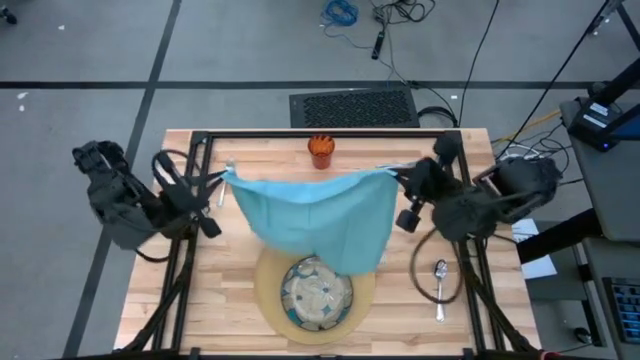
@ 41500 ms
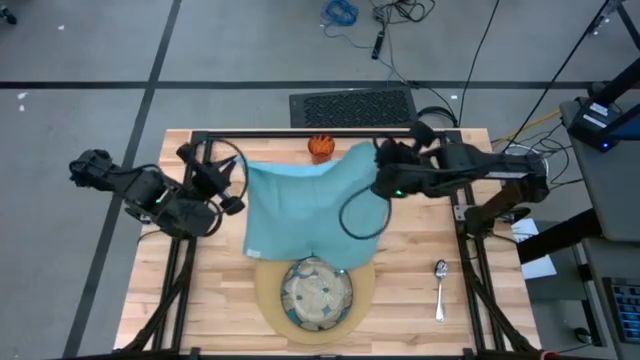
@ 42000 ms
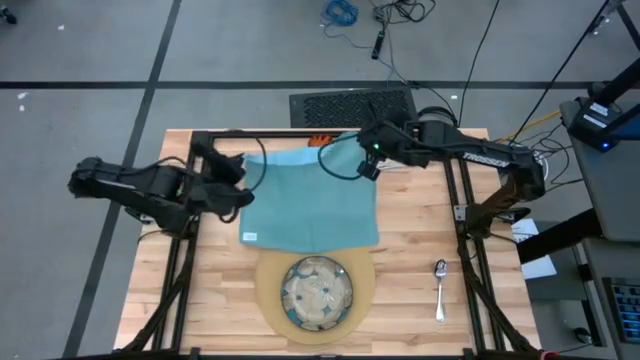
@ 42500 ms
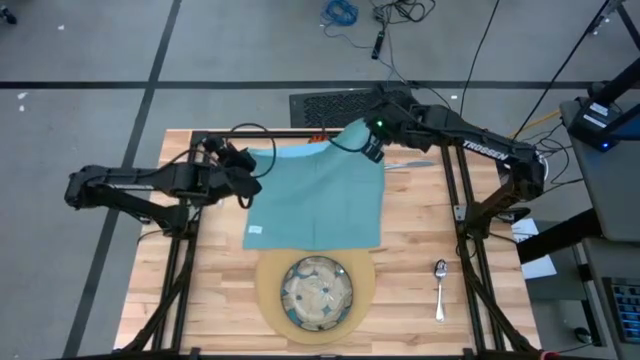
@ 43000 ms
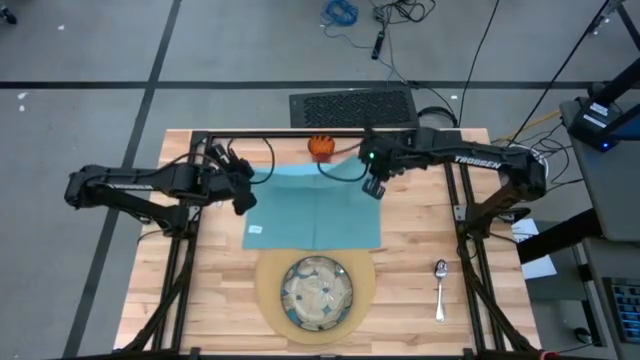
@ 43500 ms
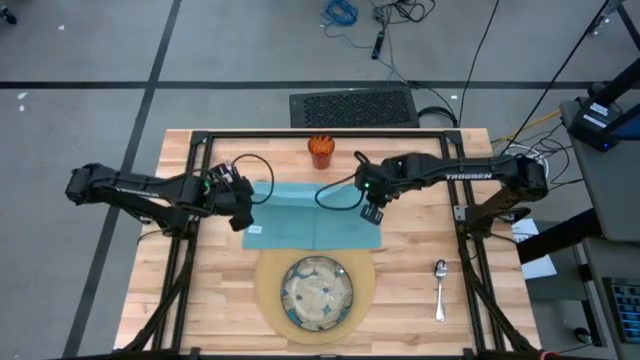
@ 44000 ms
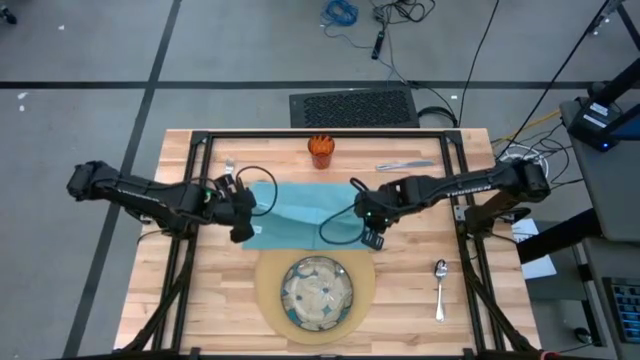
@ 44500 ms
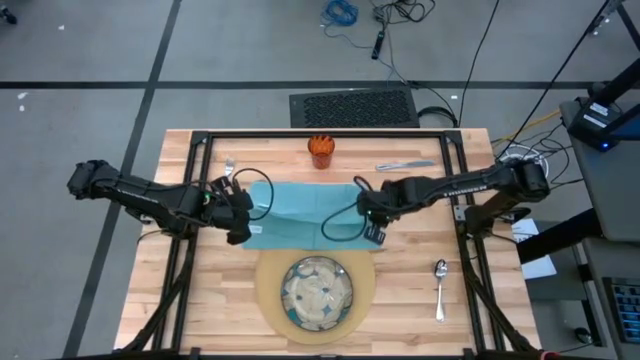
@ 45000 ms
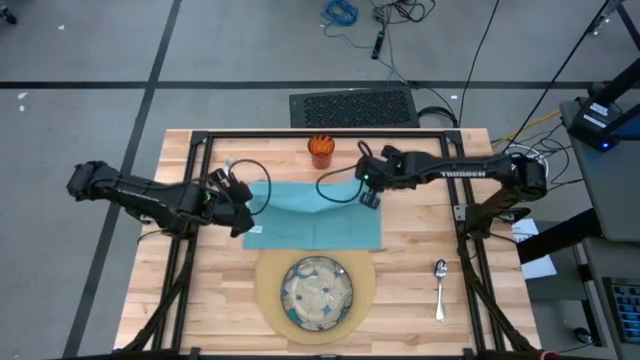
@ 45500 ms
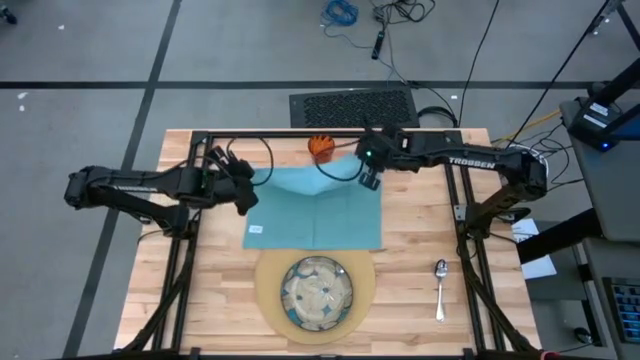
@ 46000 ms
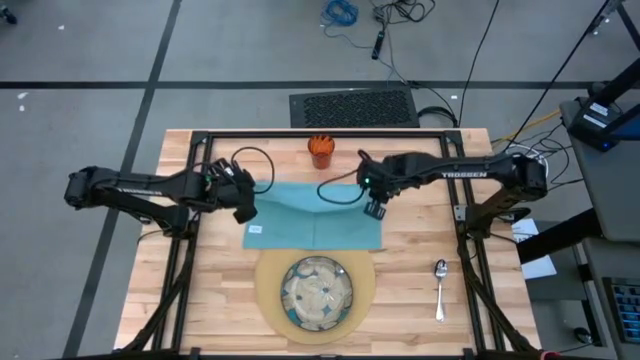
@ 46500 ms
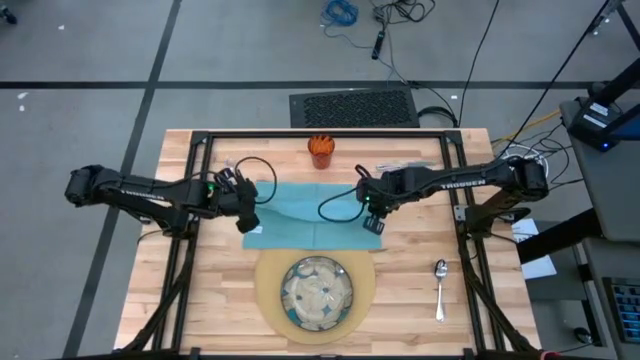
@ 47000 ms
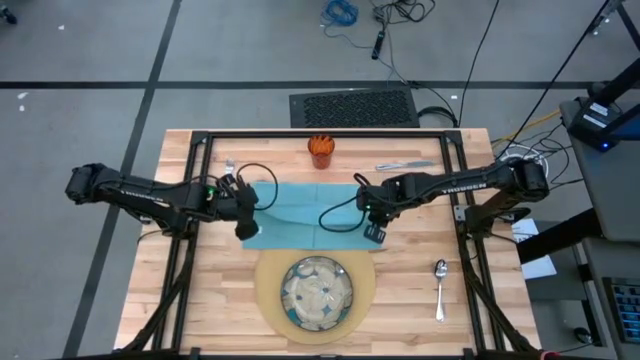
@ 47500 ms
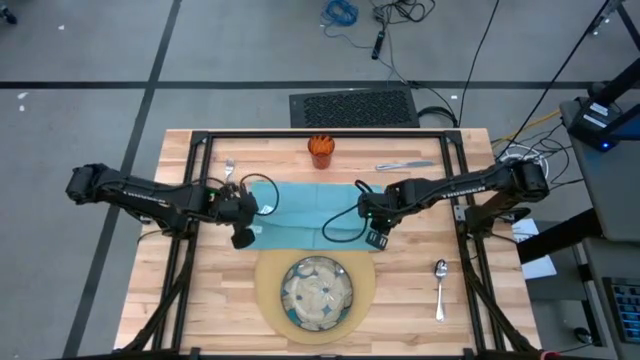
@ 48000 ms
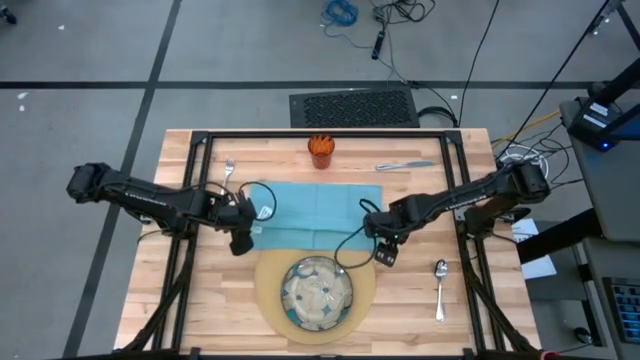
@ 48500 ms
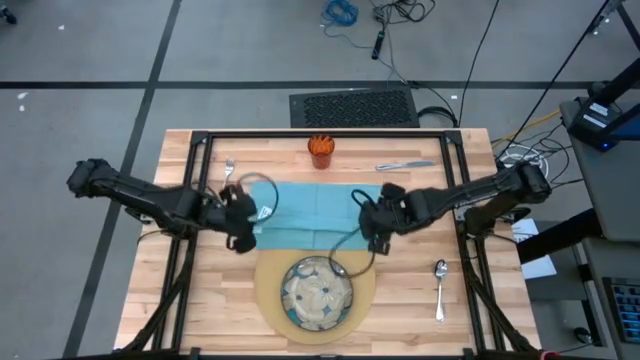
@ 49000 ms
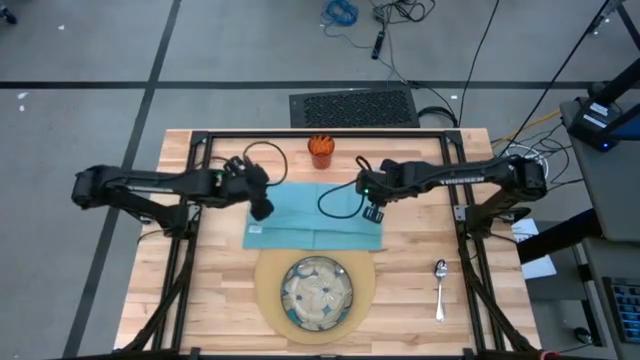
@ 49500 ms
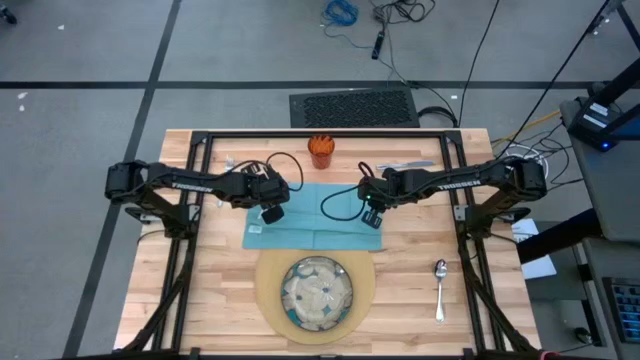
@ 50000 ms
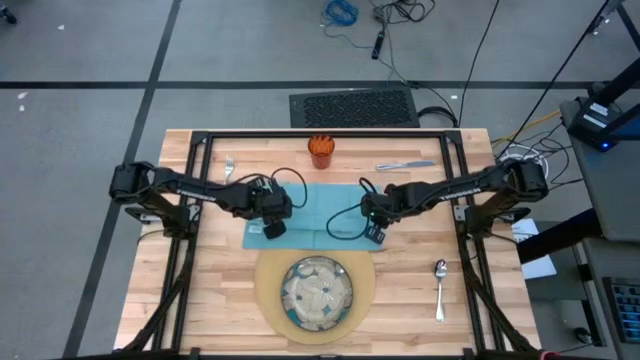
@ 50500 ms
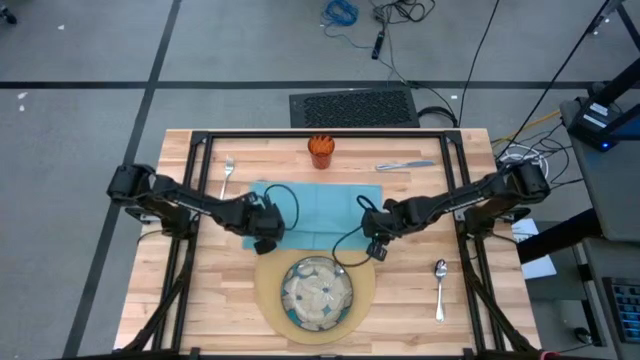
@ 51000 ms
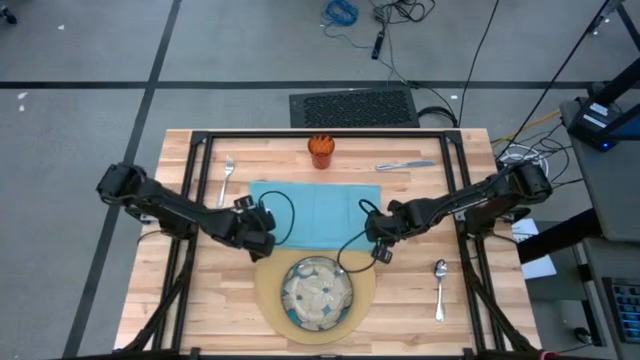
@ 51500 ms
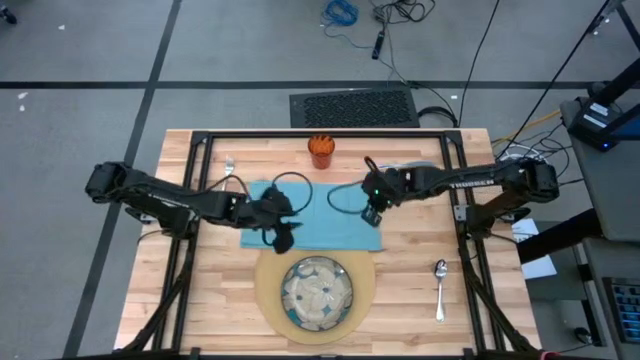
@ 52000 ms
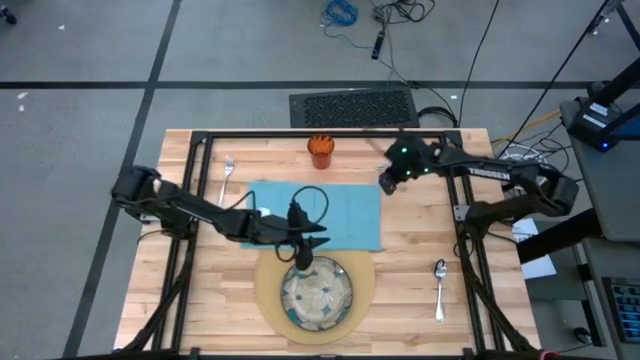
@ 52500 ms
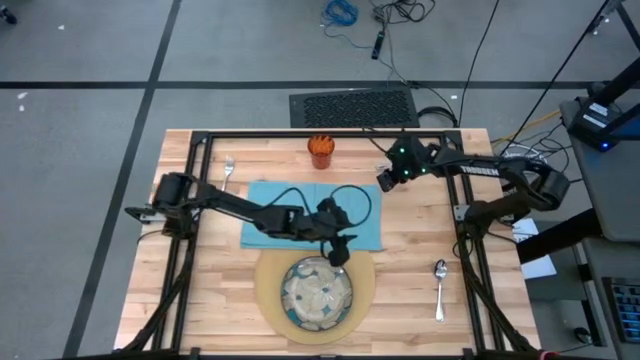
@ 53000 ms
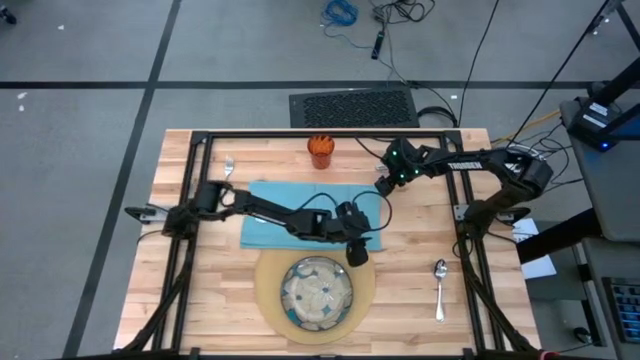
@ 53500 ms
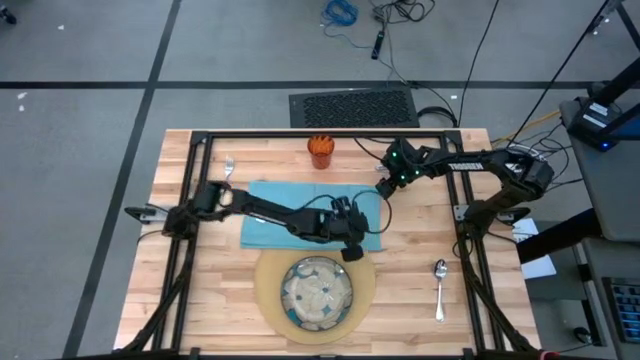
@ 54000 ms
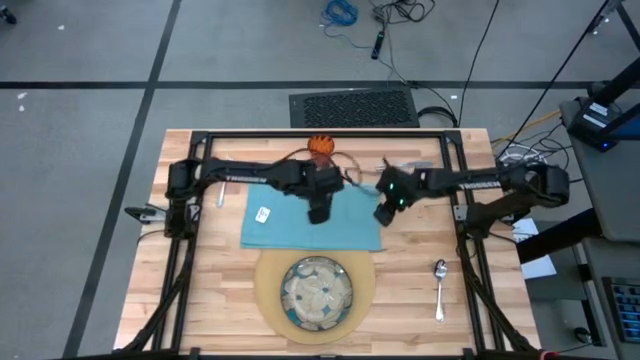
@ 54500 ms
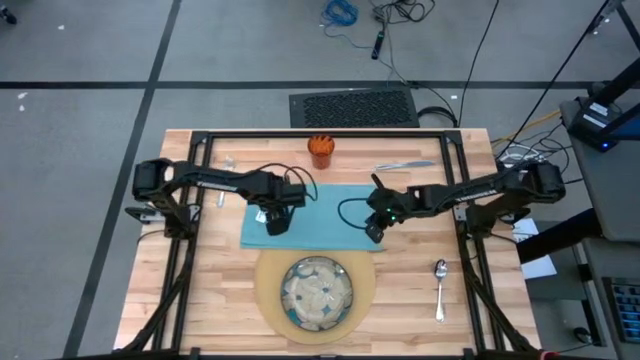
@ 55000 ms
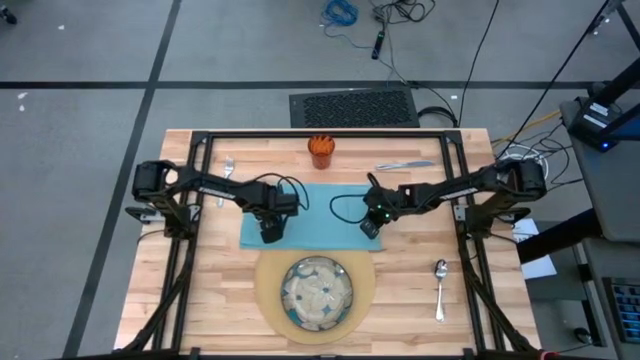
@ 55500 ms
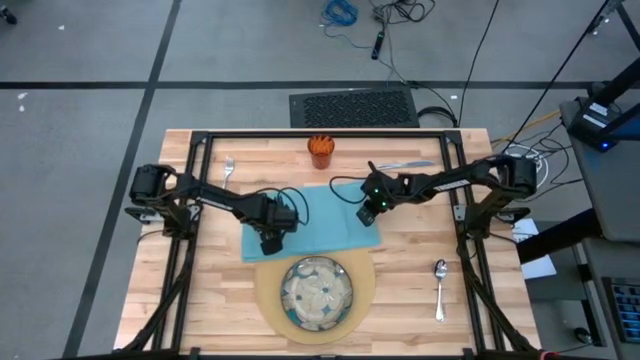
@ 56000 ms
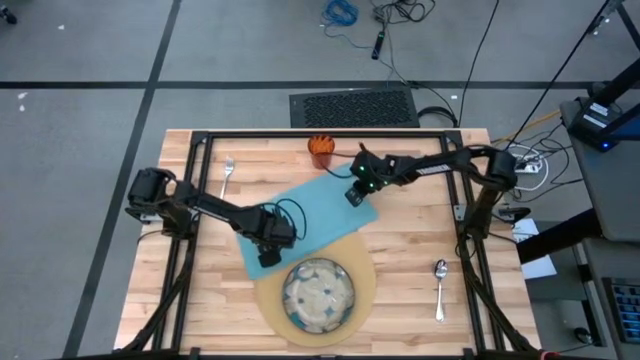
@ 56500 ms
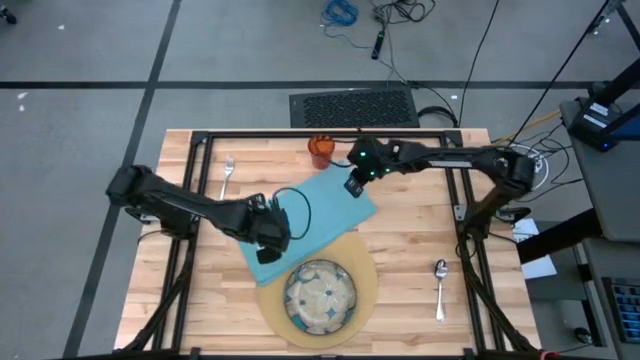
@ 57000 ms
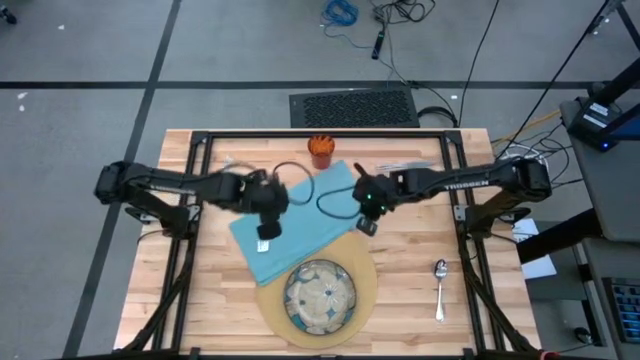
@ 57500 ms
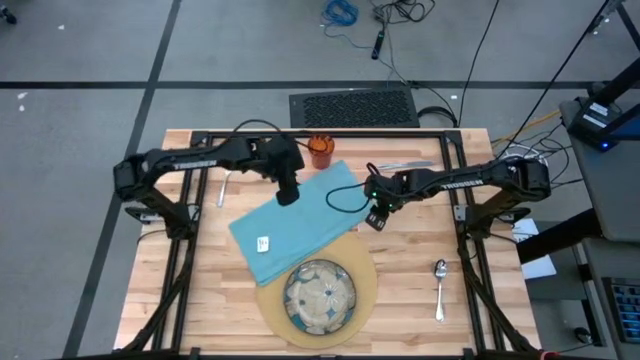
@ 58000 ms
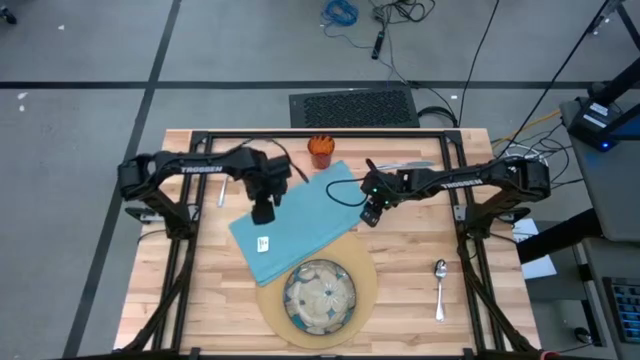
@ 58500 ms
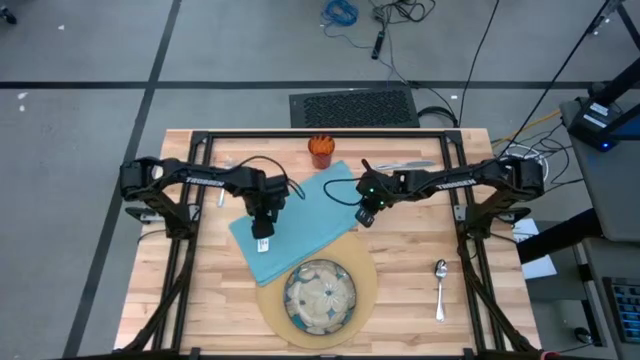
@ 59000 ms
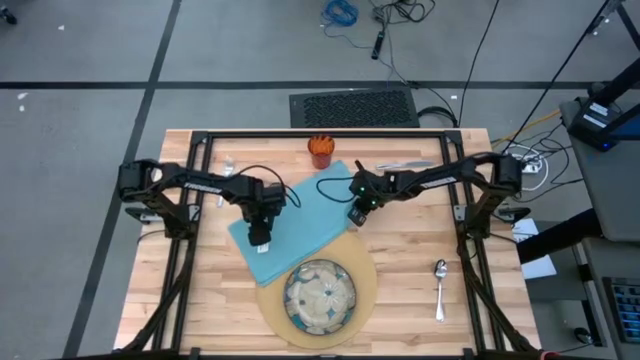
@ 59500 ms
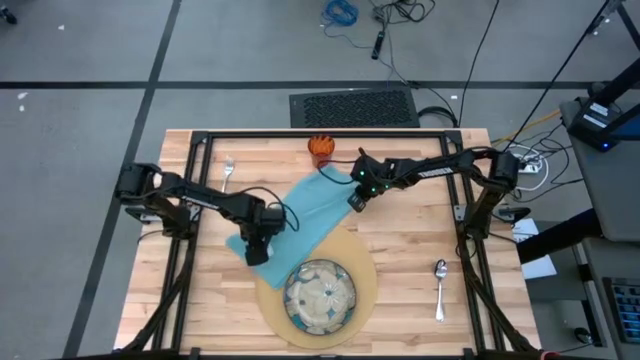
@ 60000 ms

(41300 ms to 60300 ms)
Task: Set table place
Fold the blue table napkin
